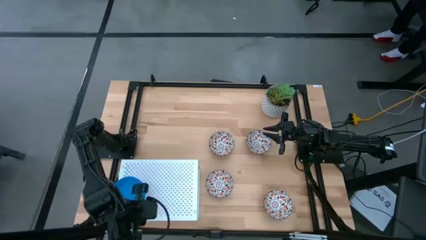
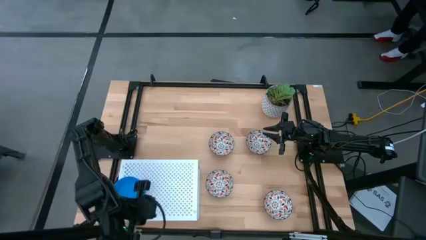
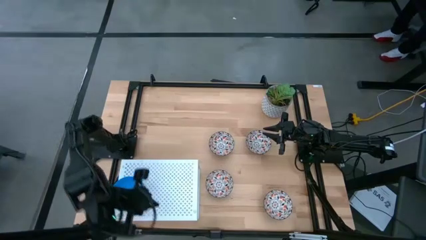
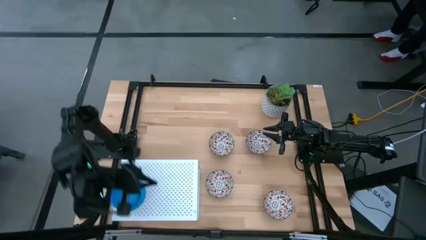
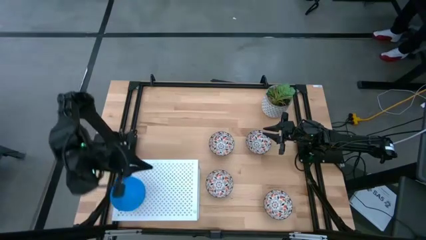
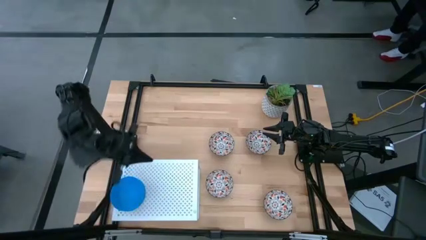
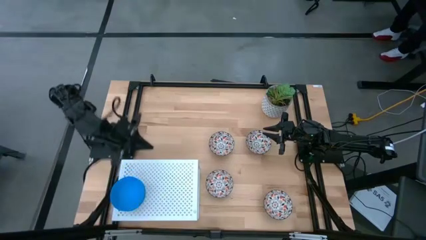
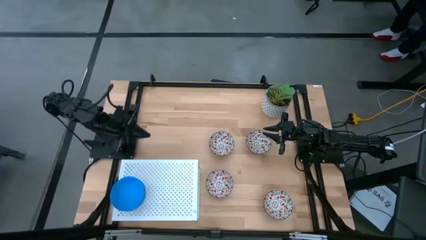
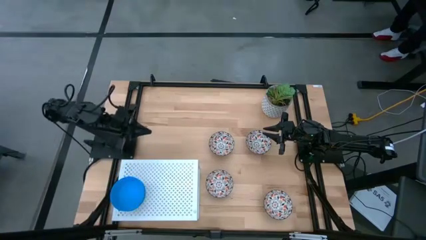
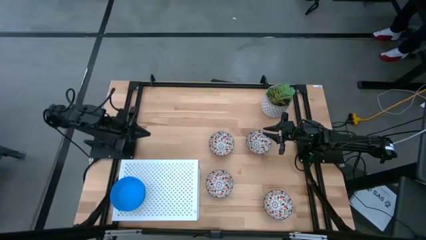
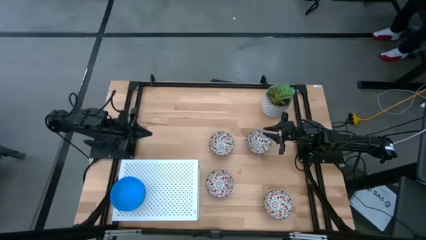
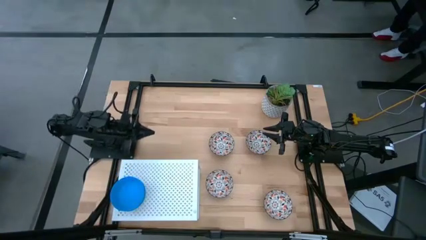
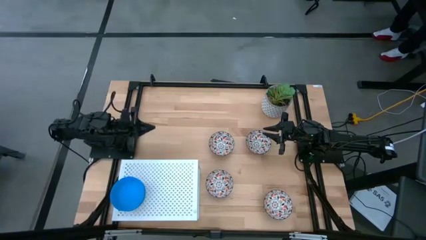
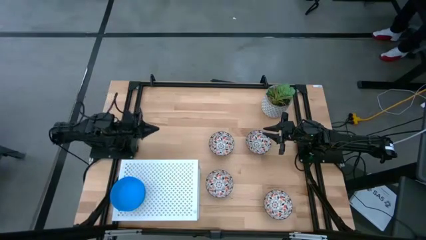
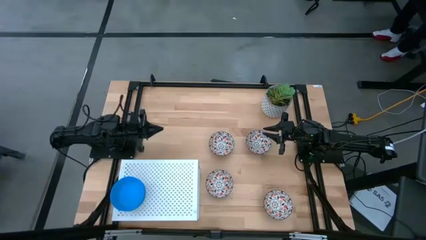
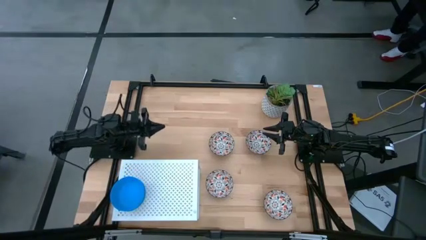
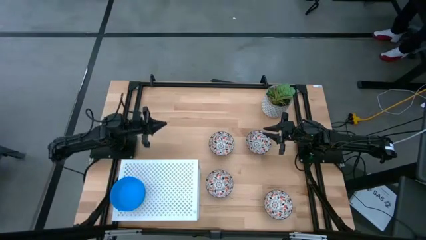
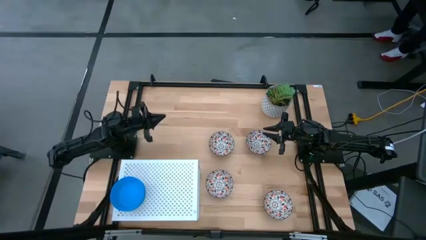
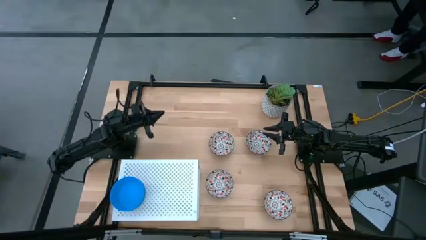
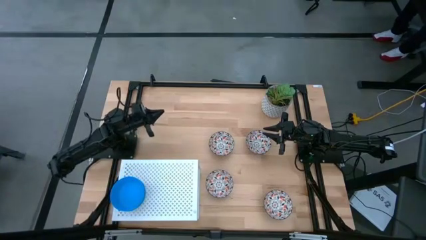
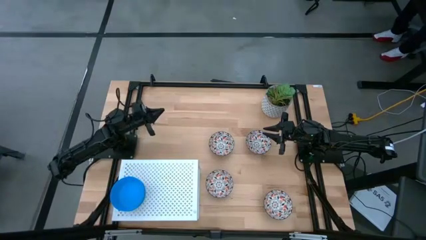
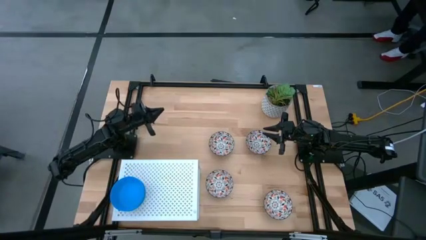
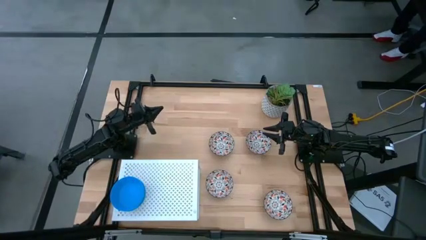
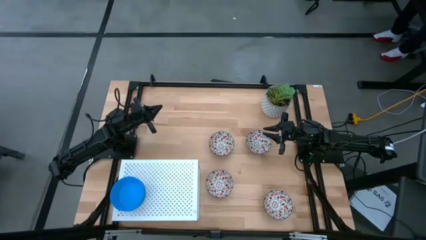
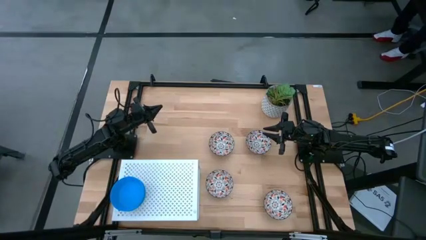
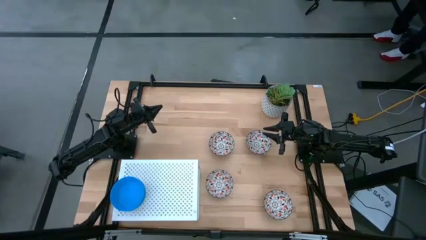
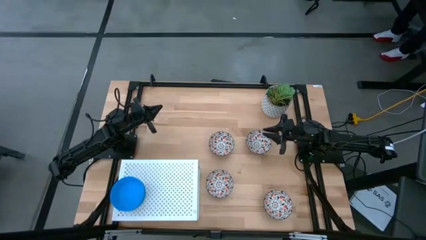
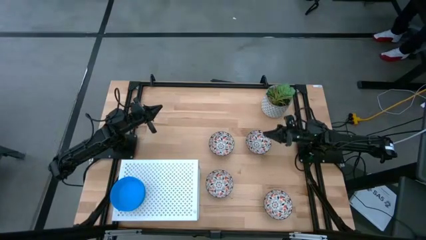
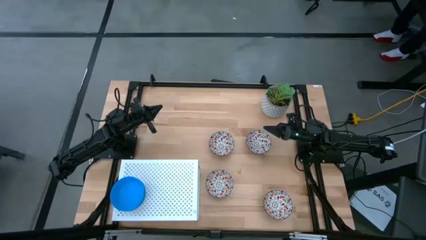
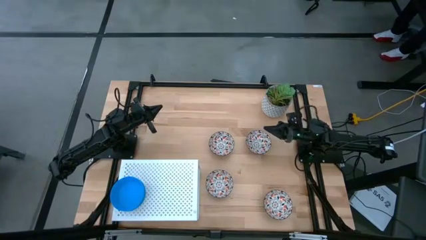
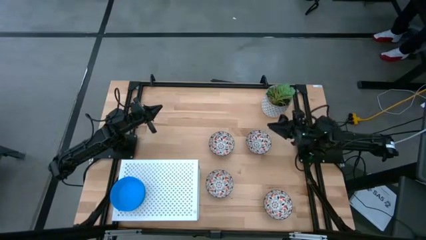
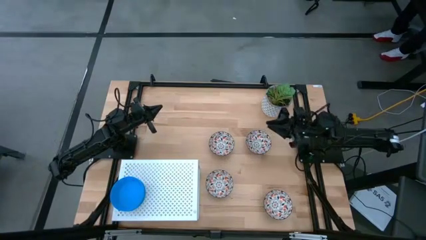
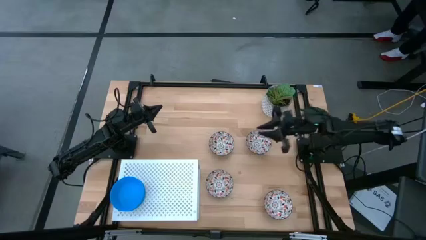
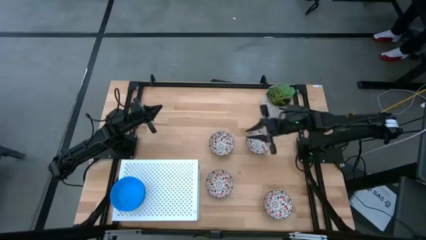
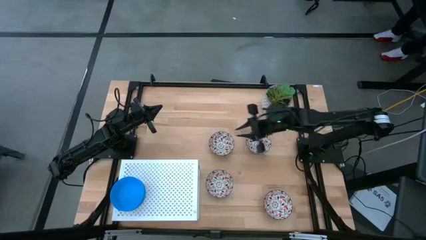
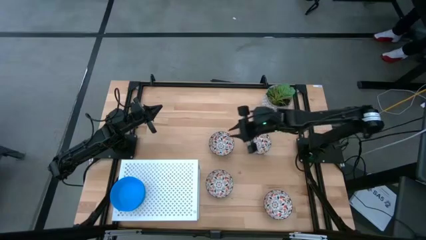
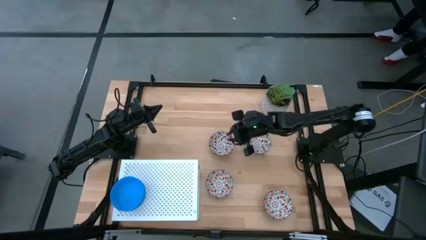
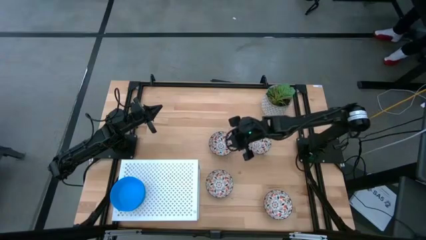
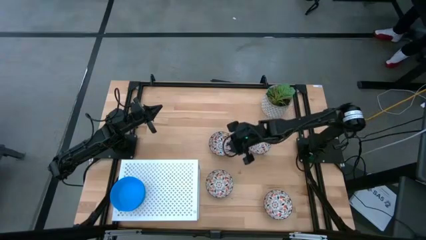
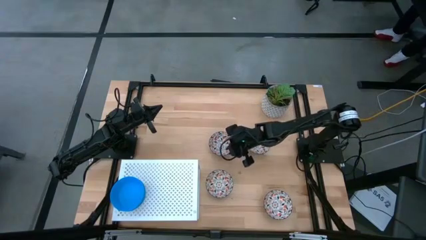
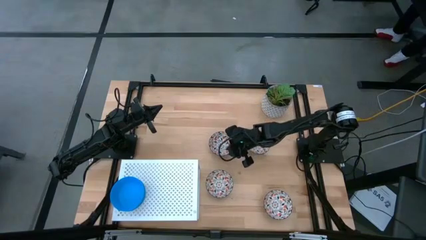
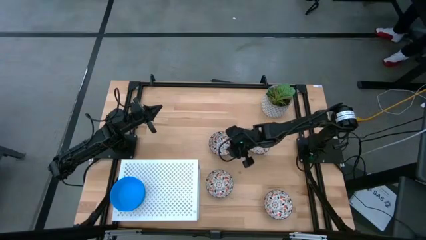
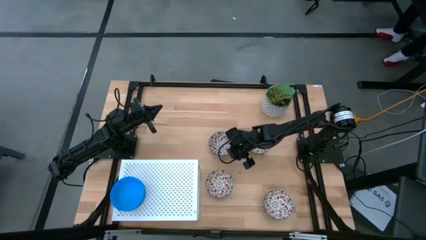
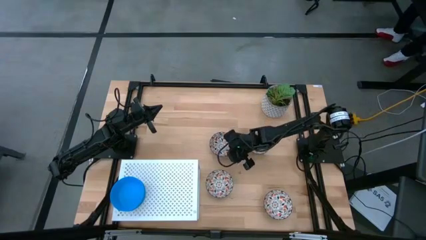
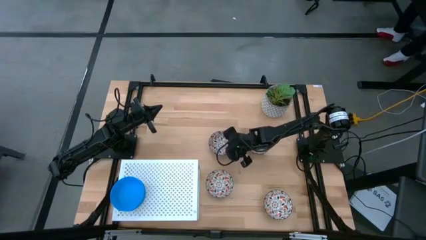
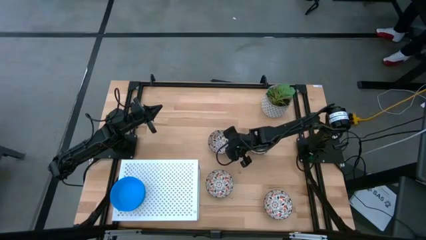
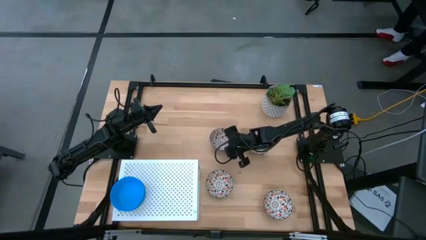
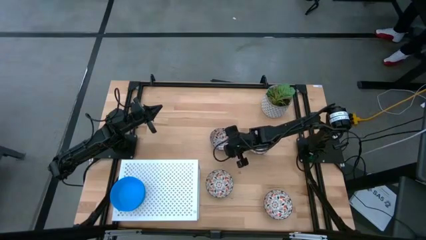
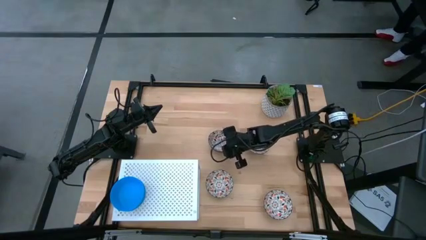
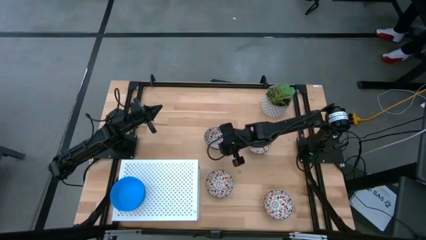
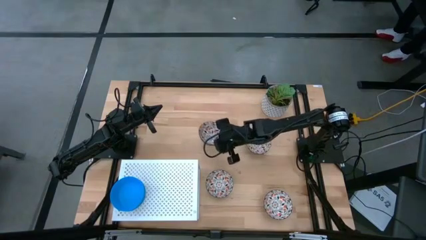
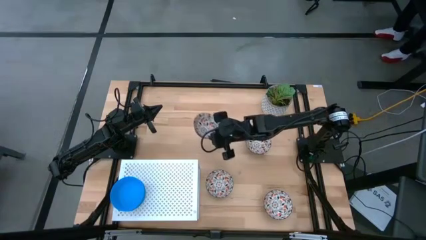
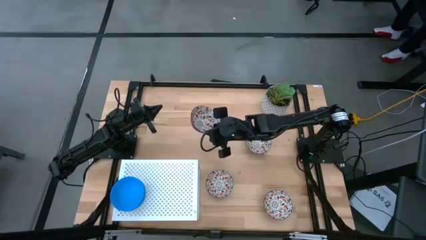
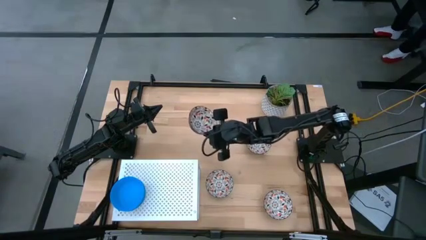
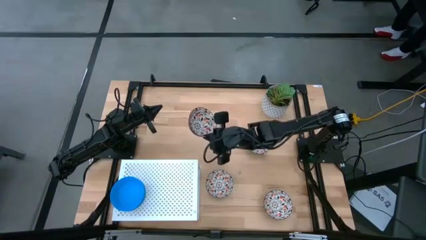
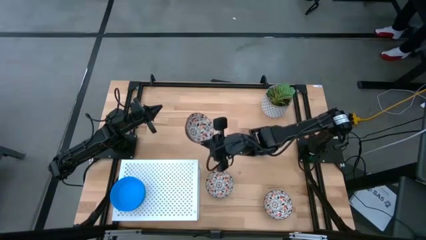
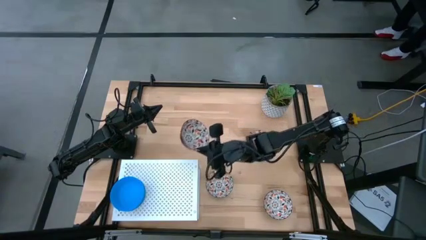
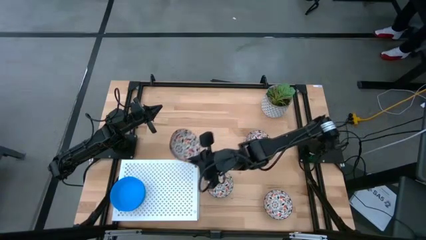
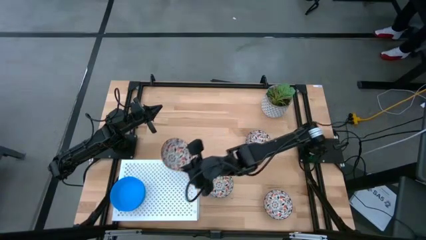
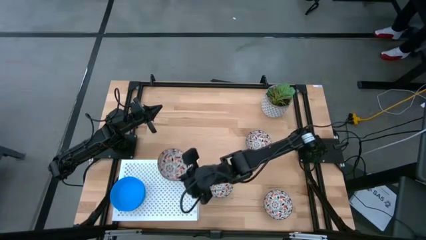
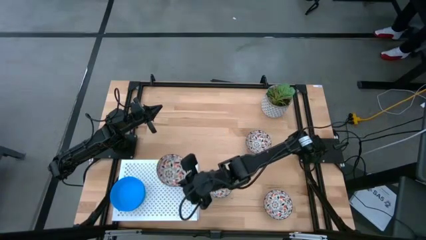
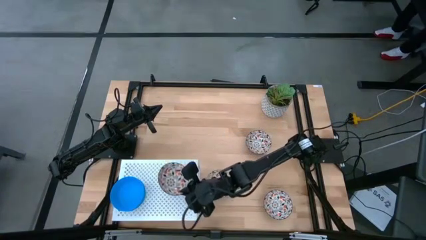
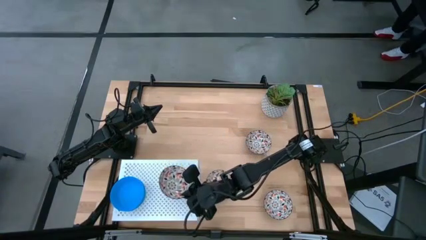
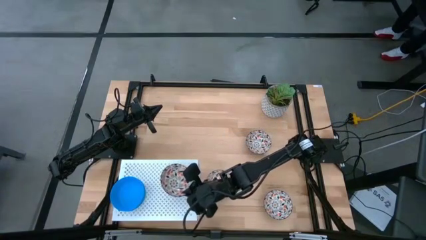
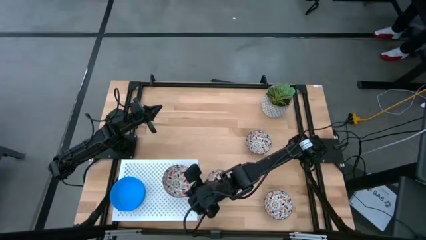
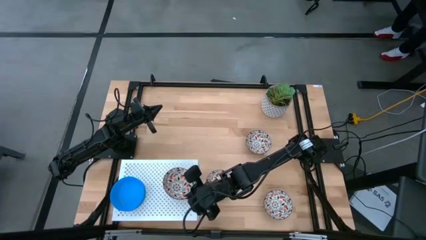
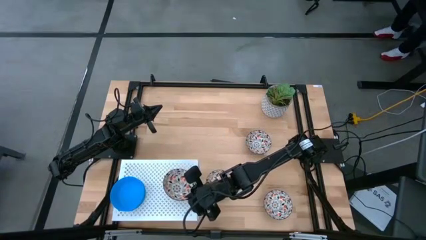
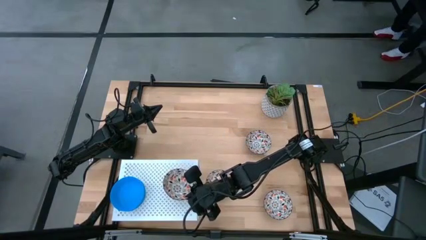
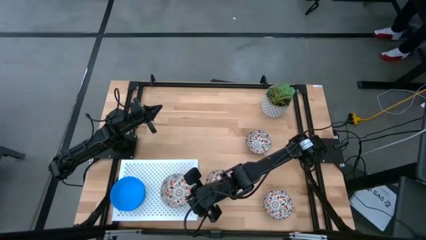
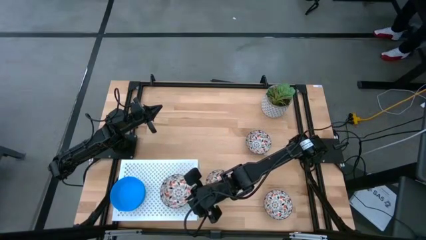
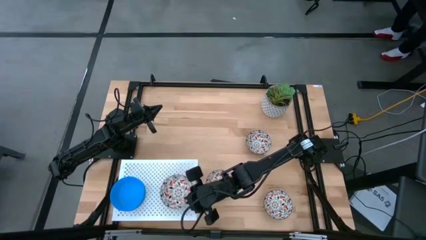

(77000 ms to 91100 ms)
Task: Pick & Place Mini bowls
Put the patterned bowl on the shelf

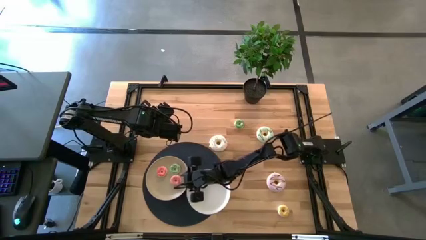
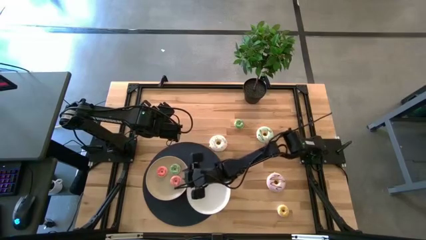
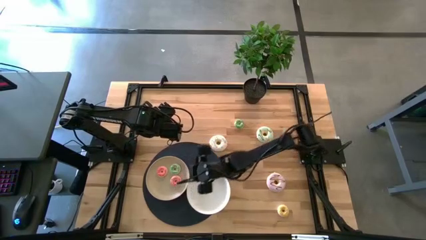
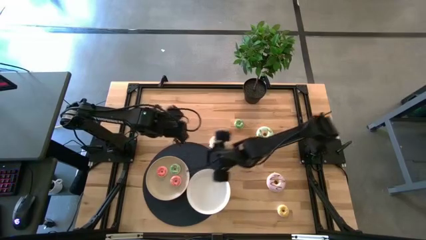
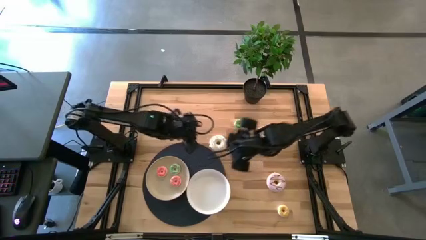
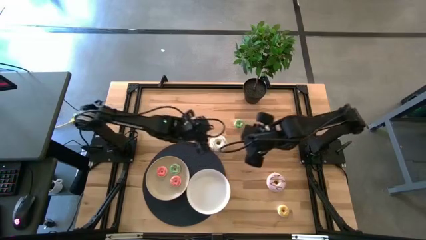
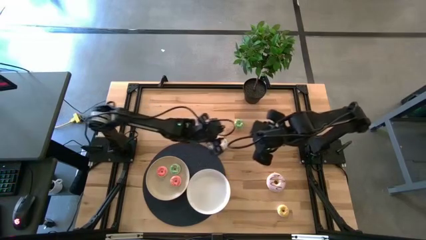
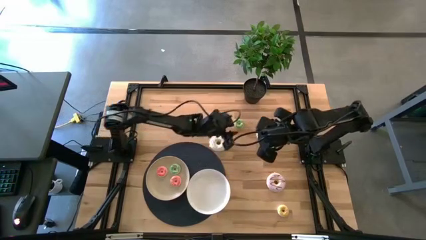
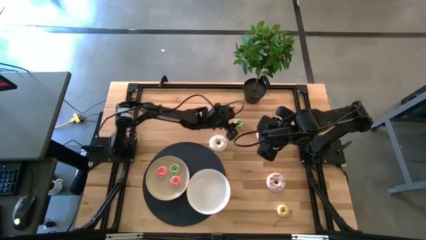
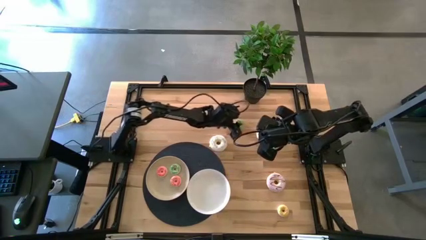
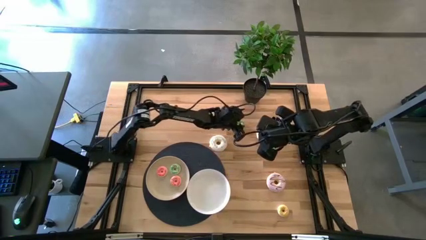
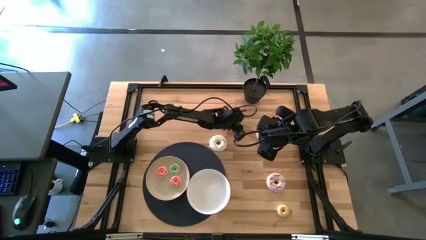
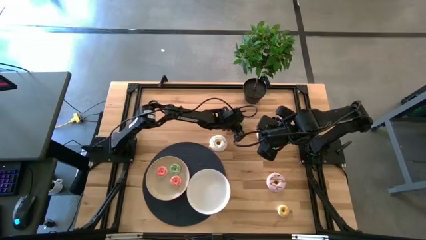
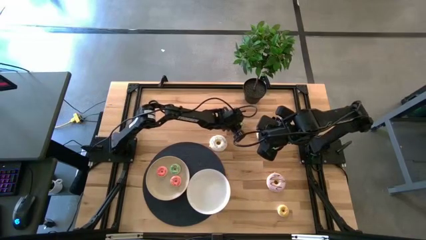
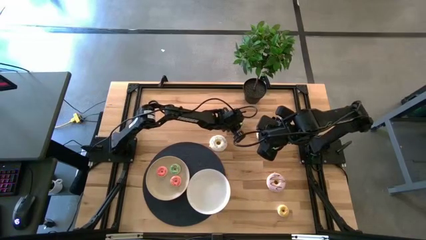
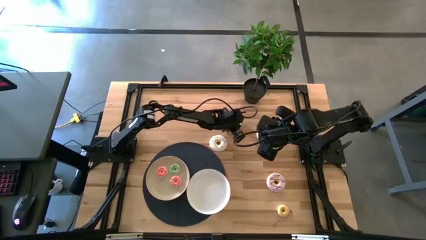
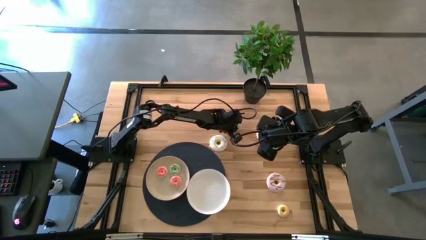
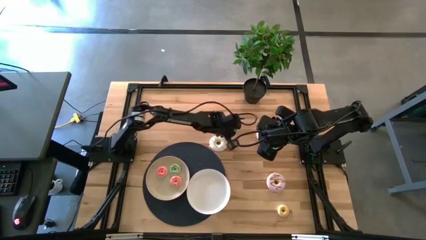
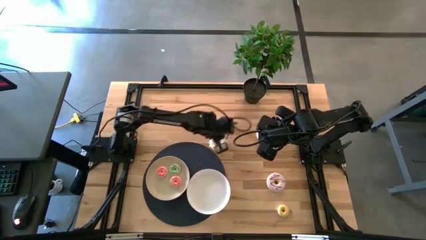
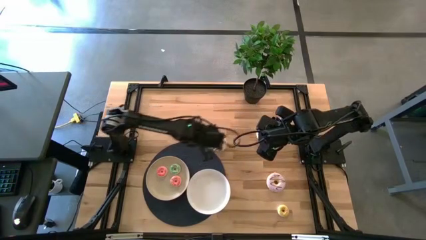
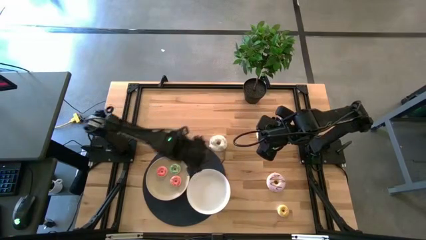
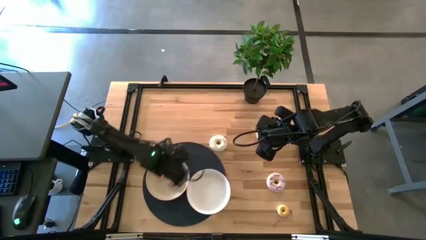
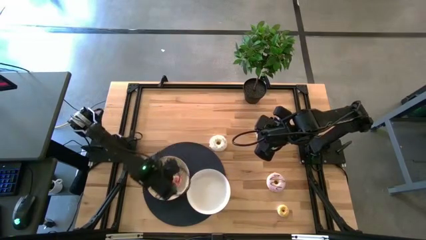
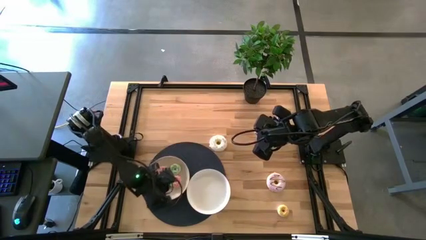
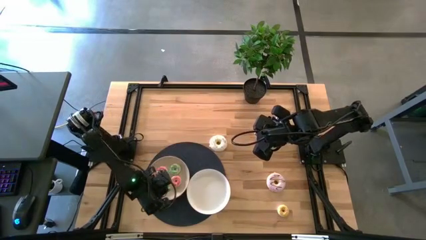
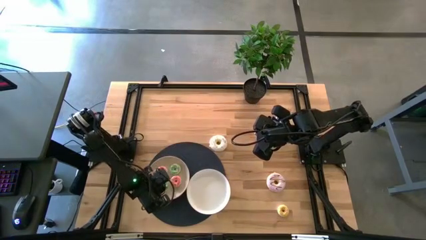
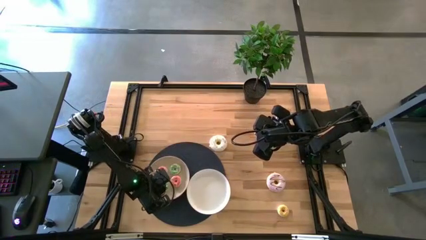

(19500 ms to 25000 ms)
Task: Pick & Place donuts
Put the small green donut on the left white plate
